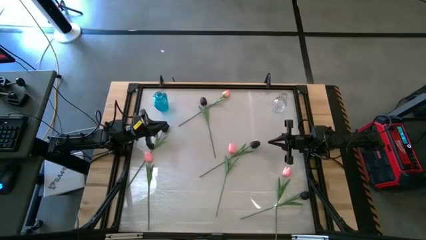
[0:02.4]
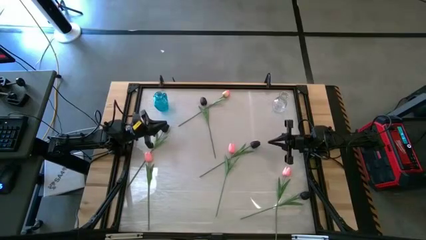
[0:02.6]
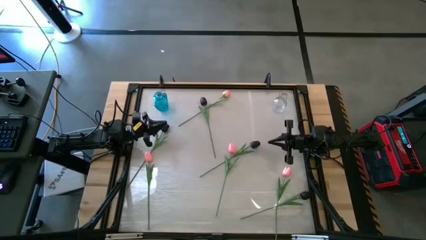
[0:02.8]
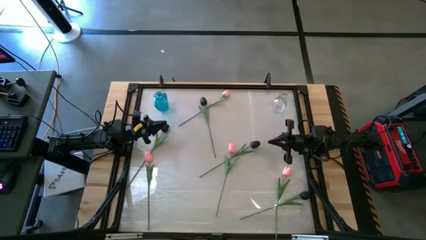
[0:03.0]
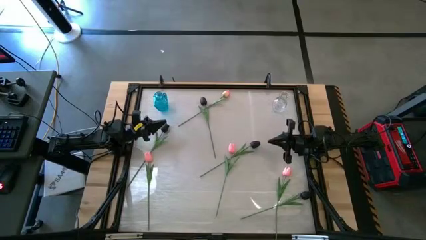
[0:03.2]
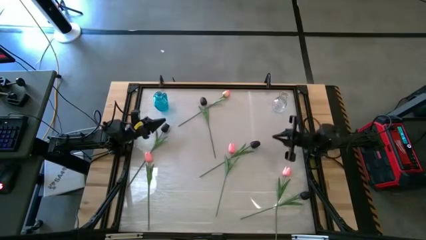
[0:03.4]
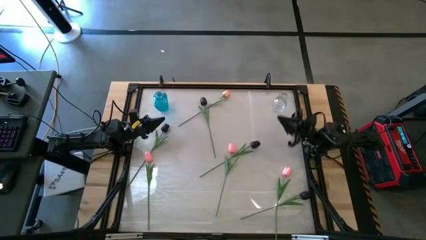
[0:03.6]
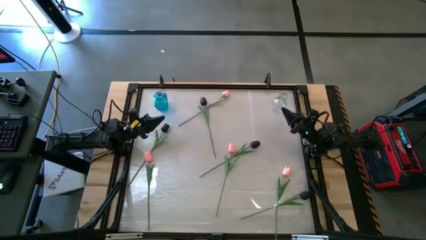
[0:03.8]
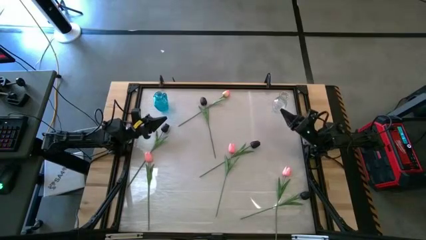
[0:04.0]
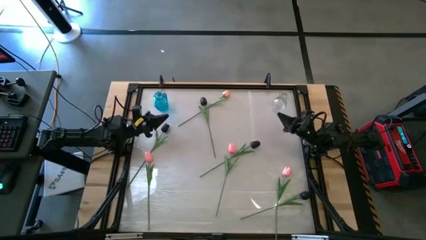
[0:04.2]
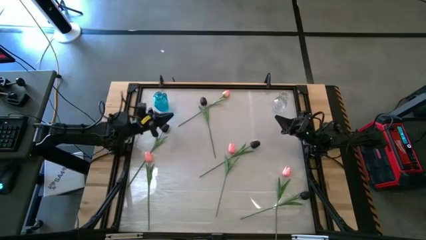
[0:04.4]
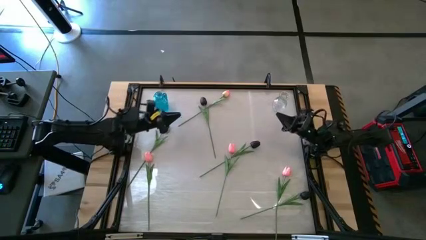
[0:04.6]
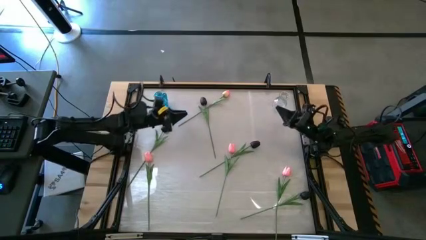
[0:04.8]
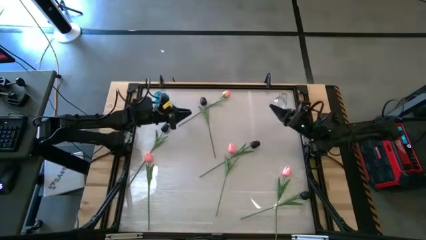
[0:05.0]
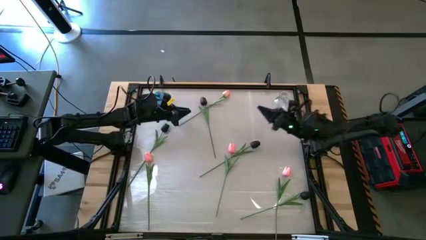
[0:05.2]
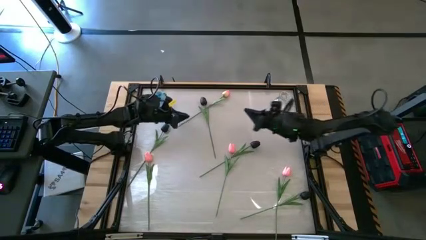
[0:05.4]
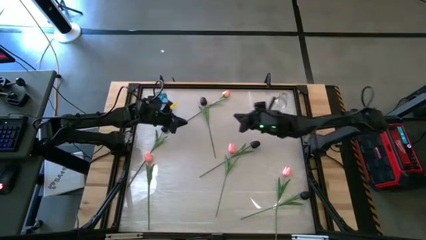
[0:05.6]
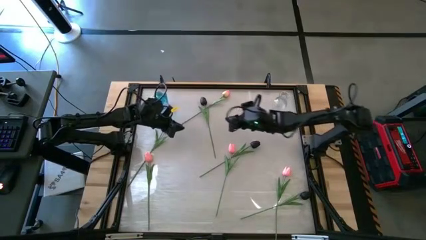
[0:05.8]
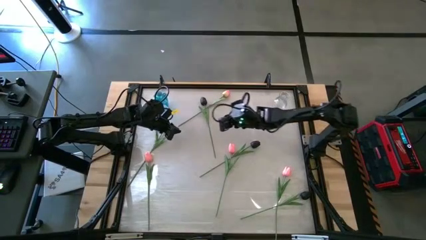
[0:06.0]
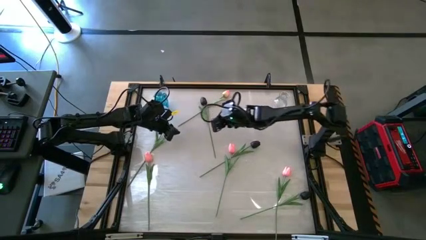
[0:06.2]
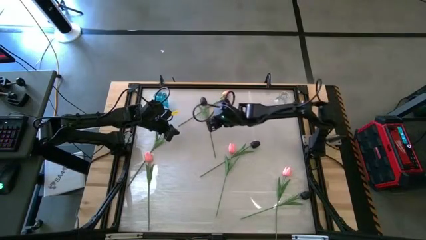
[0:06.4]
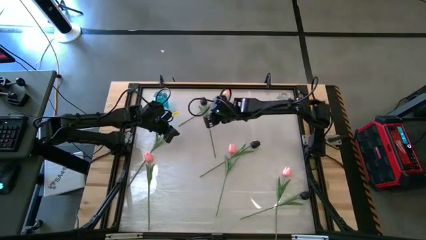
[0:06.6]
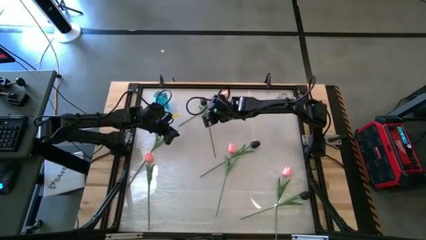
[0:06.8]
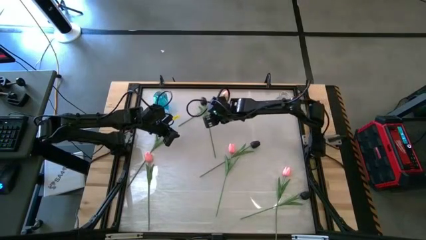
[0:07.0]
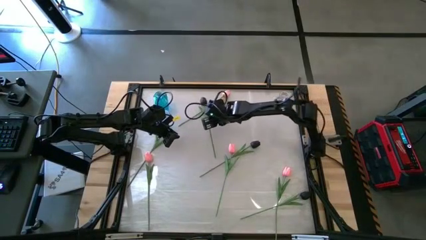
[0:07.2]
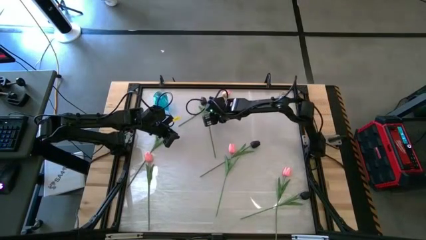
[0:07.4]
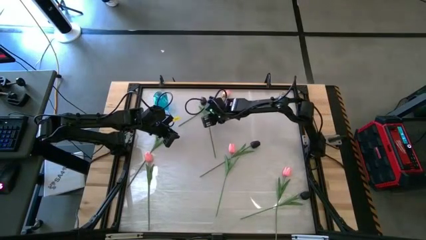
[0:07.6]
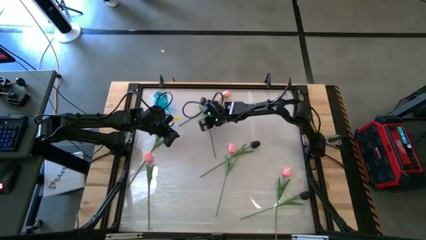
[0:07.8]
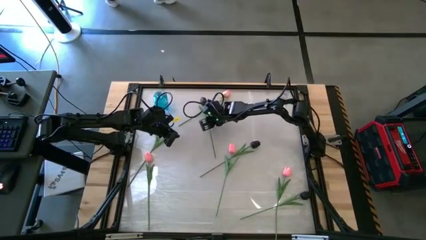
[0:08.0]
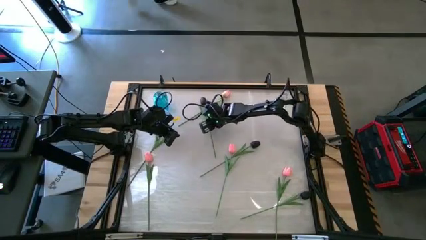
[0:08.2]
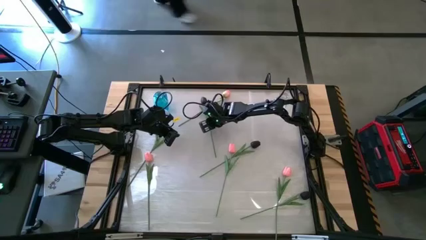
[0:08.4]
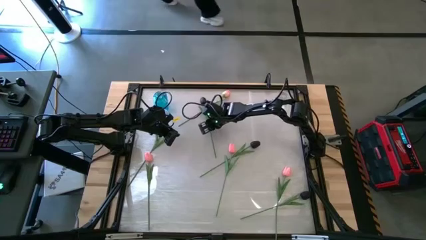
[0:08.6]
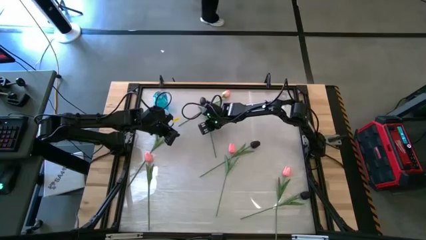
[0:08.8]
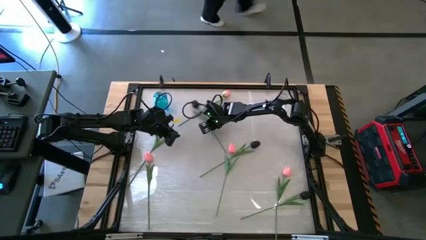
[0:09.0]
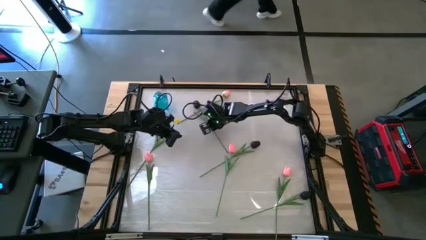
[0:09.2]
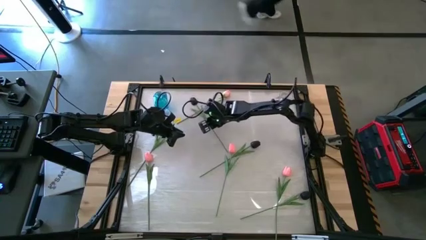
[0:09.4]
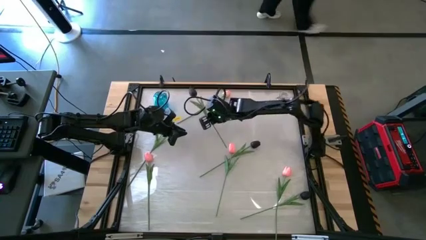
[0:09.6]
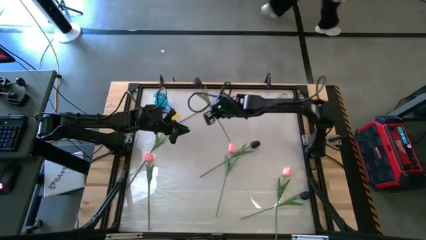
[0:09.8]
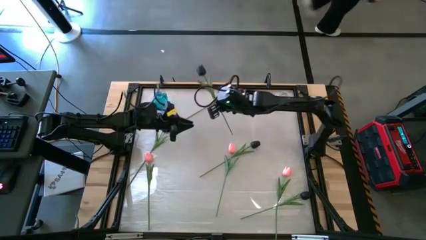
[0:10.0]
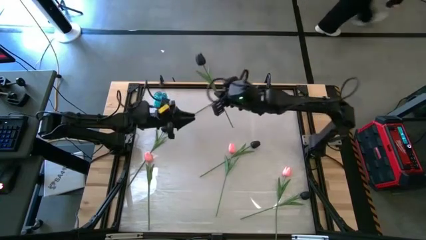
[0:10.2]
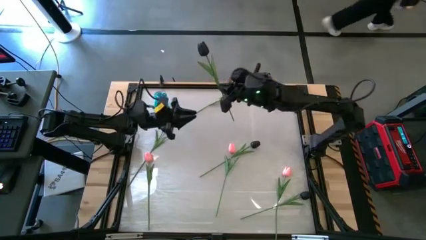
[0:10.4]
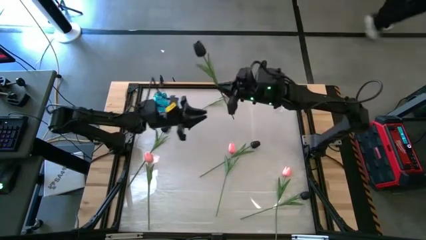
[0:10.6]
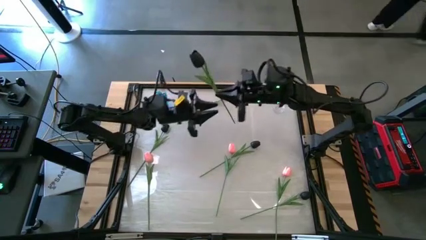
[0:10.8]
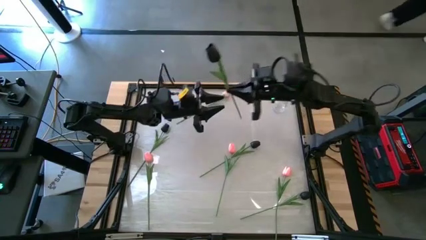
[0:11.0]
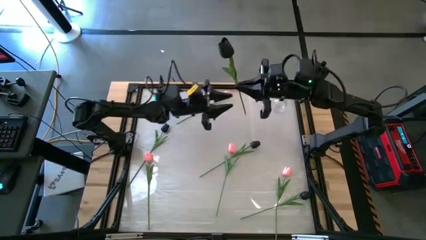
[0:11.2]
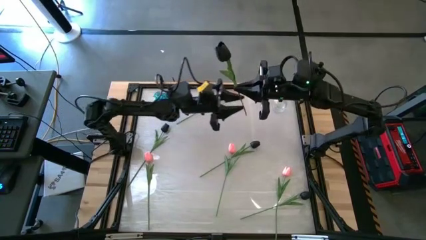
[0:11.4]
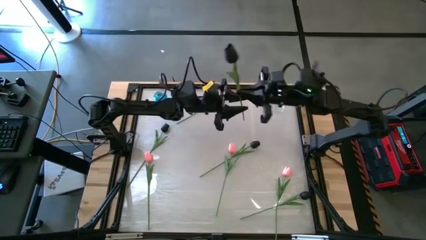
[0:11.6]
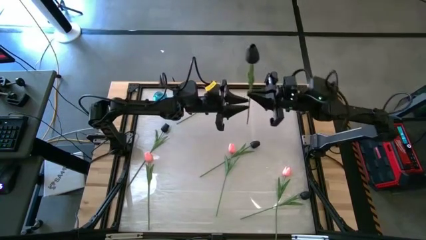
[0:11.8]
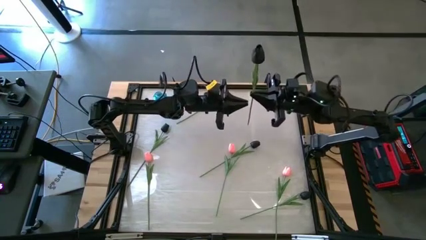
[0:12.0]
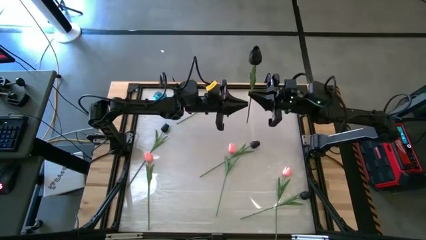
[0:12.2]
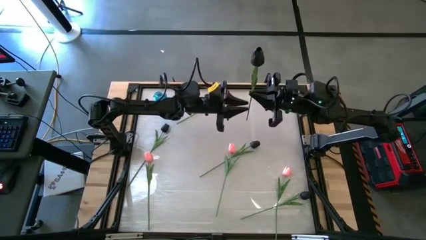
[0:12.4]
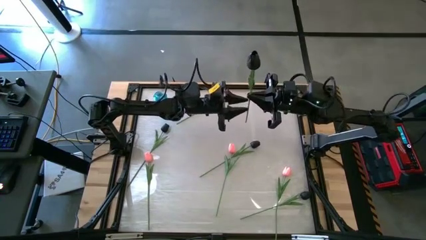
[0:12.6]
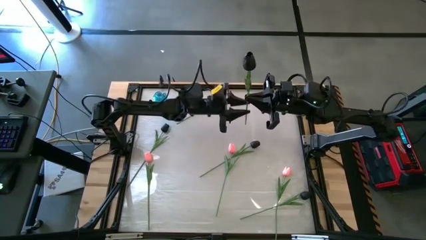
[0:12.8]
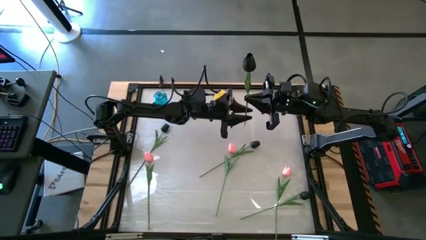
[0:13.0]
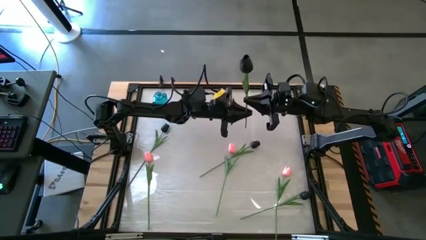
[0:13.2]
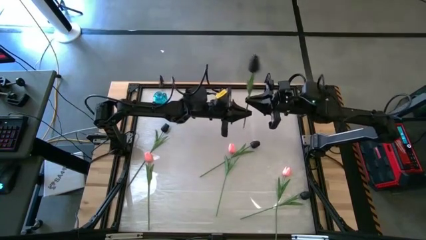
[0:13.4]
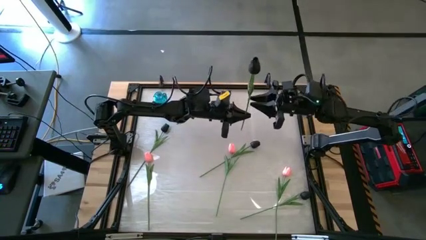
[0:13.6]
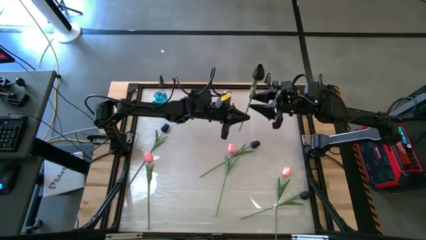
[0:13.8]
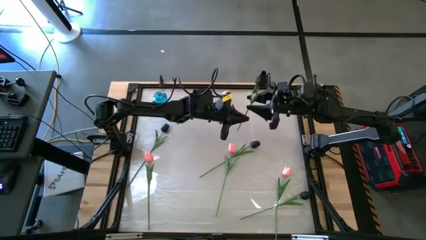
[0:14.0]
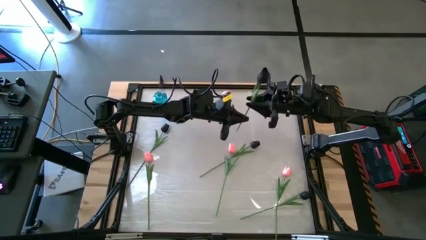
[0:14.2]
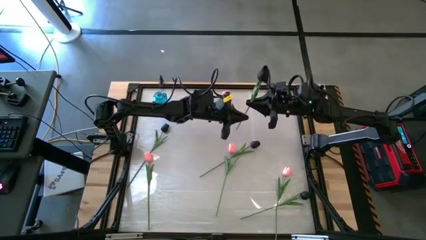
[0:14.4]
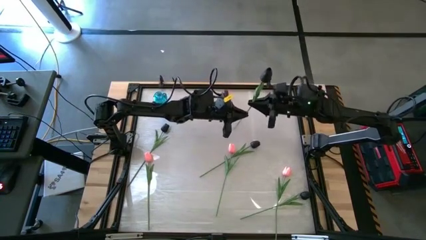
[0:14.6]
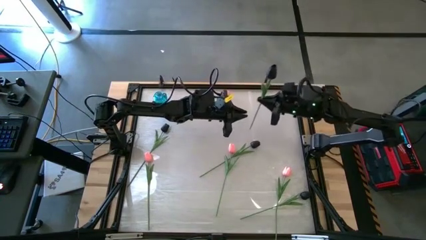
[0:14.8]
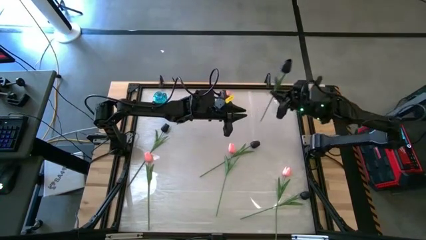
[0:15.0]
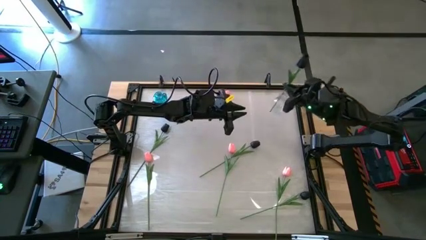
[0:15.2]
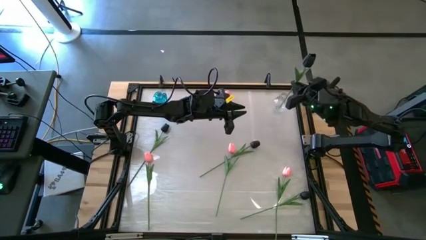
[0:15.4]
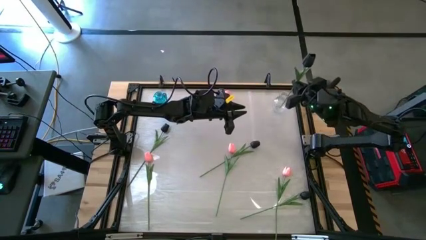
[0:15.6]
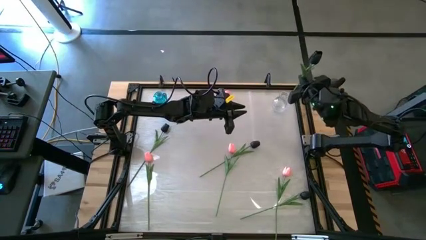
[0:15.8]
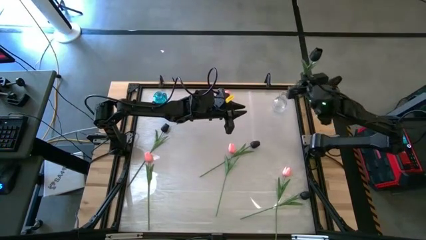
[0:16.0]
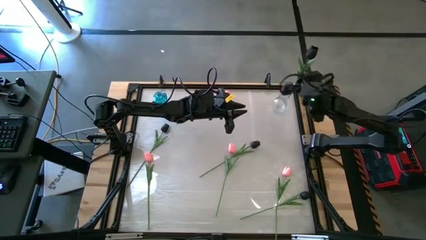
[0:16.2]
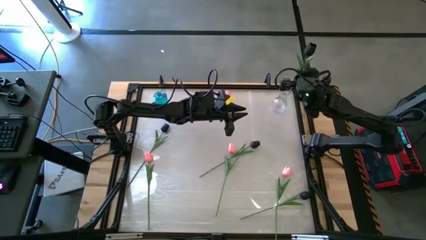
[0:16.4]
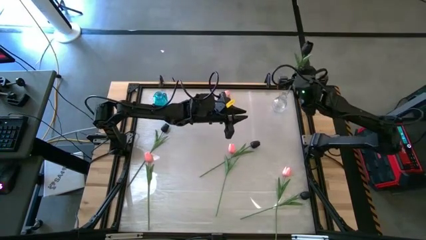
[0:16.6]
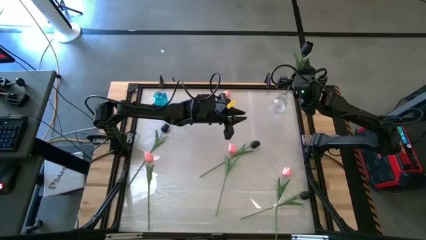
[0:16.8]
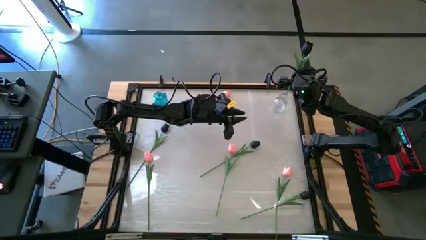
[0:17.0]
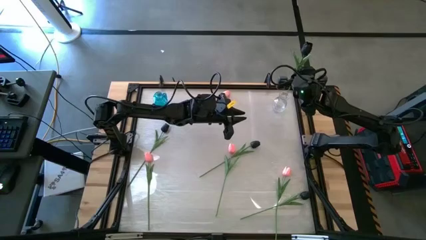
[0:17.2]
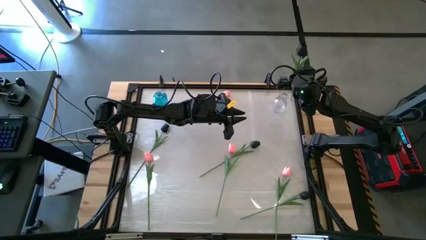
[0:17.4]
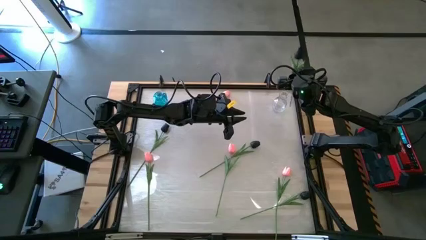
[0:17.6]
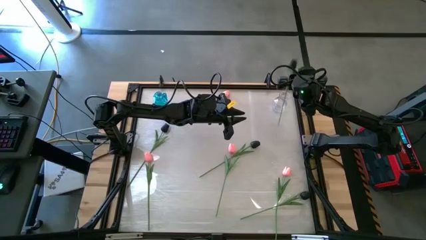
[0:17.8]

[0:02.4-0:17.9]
Task: Sort flowers into vase by color
Put the black flower into the transparent vase
